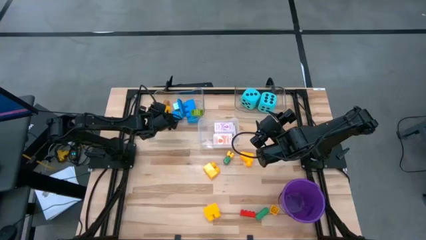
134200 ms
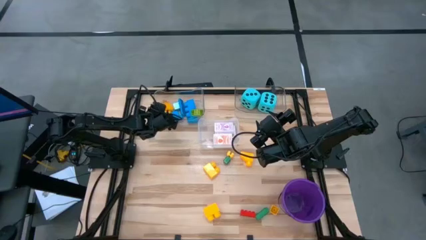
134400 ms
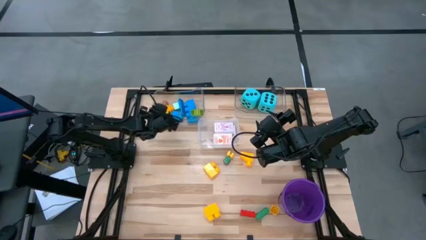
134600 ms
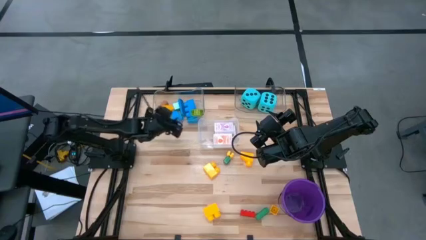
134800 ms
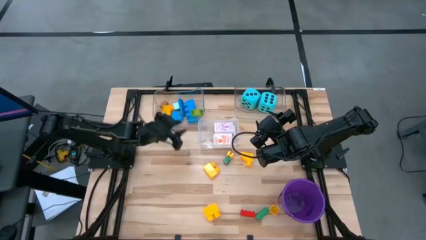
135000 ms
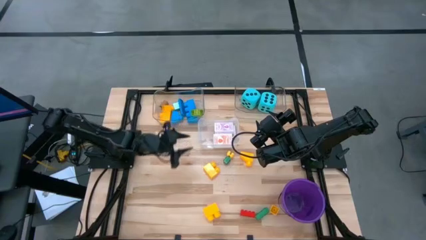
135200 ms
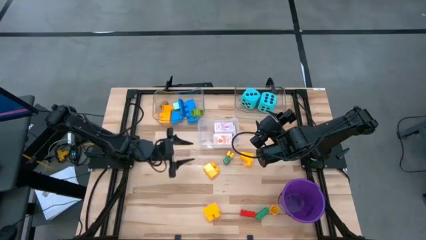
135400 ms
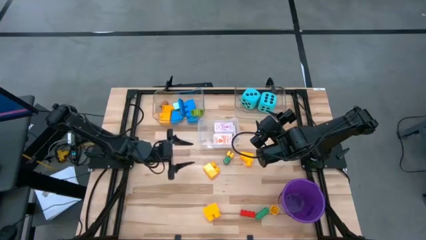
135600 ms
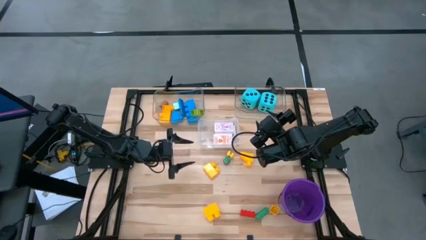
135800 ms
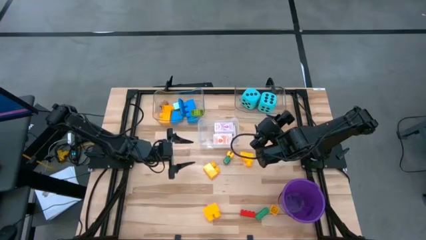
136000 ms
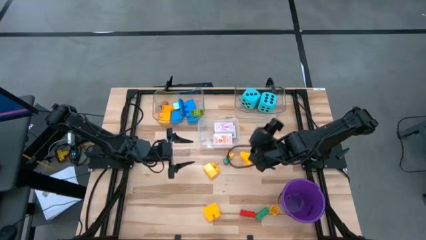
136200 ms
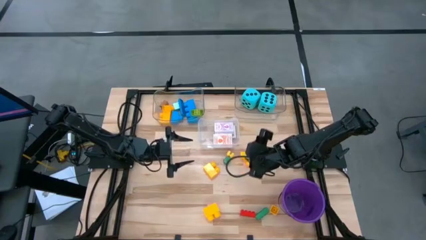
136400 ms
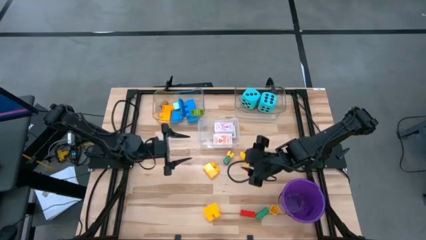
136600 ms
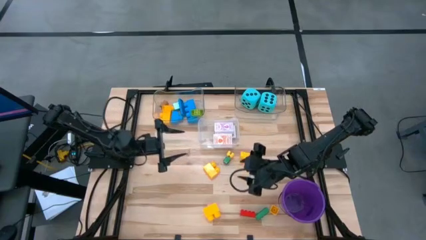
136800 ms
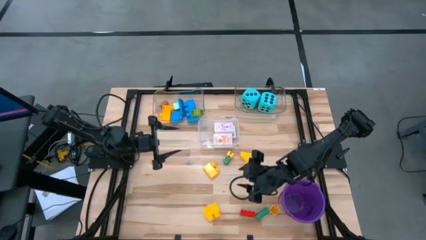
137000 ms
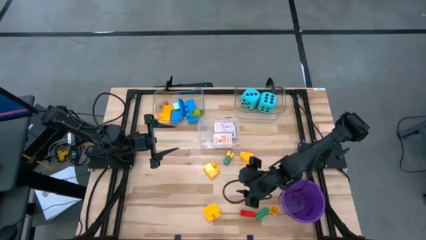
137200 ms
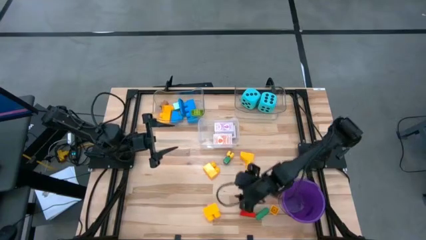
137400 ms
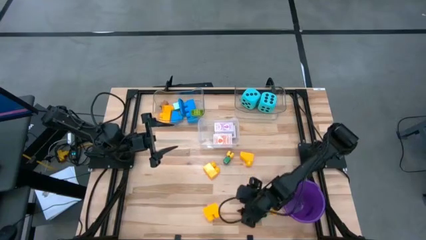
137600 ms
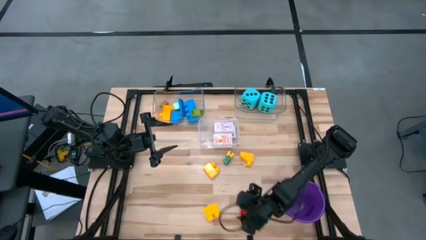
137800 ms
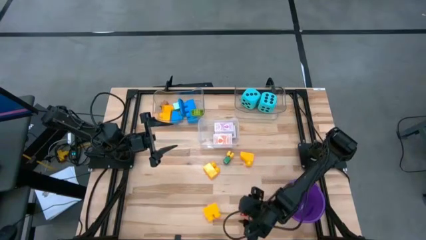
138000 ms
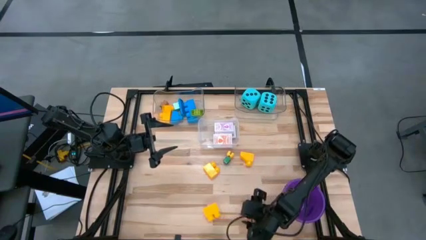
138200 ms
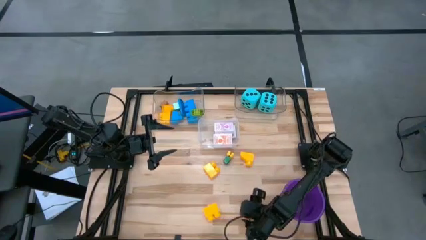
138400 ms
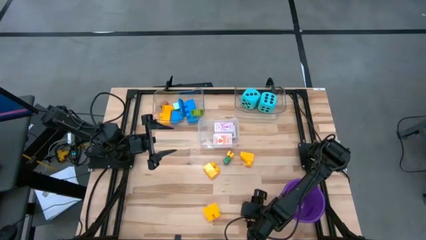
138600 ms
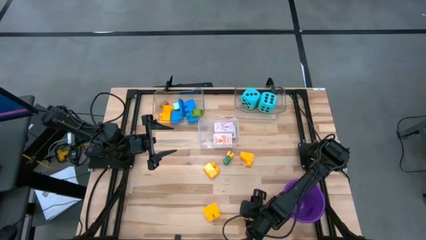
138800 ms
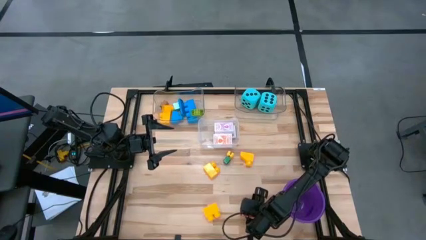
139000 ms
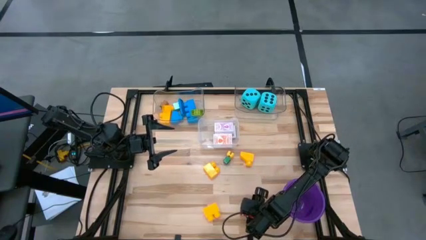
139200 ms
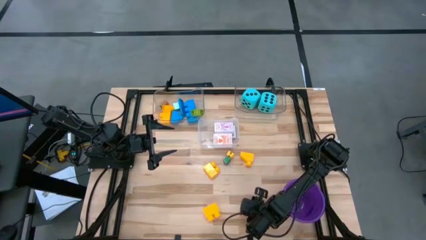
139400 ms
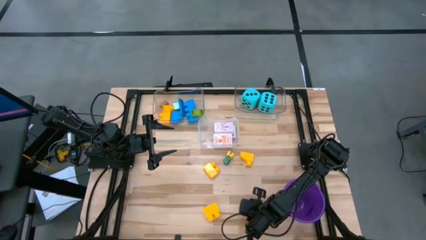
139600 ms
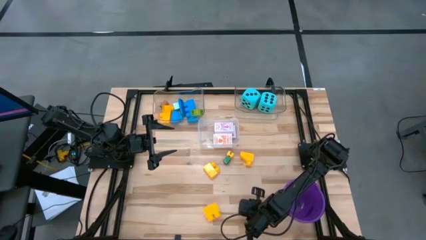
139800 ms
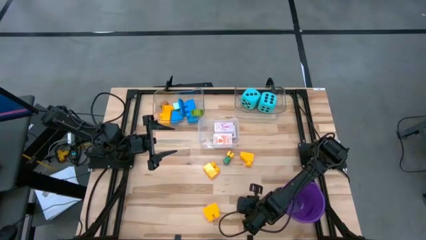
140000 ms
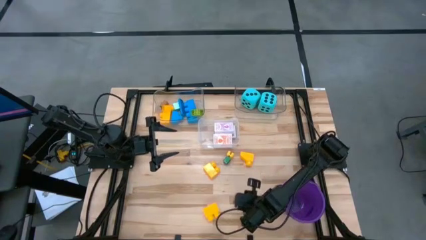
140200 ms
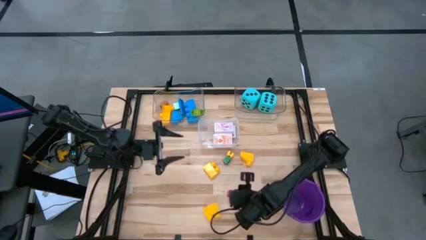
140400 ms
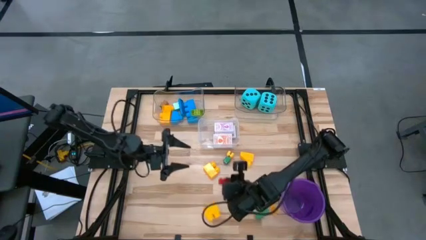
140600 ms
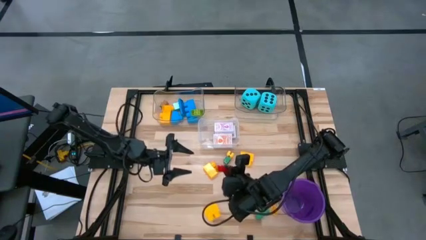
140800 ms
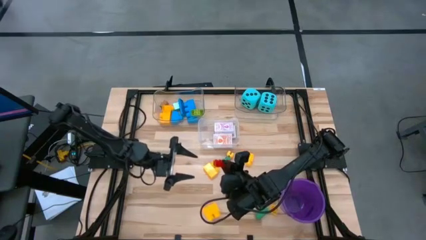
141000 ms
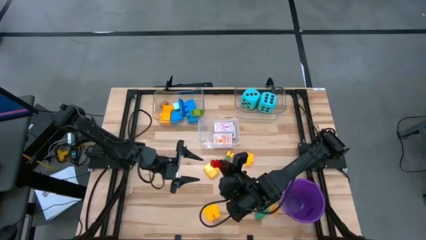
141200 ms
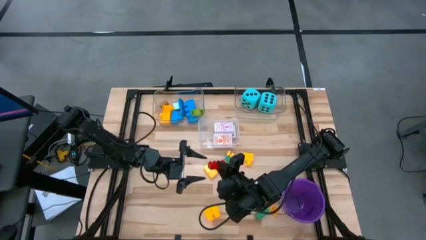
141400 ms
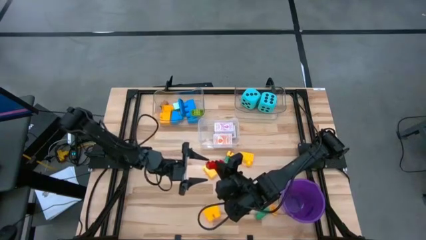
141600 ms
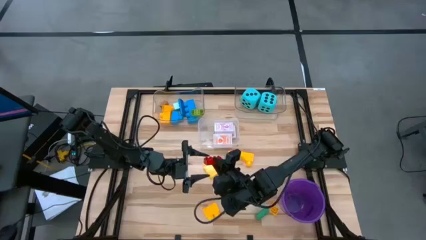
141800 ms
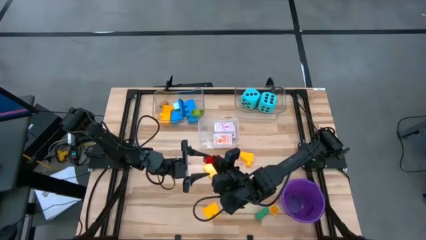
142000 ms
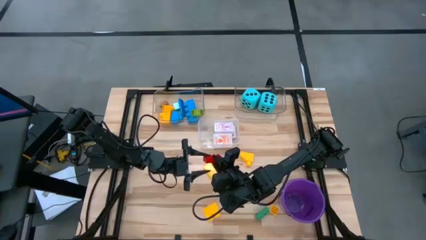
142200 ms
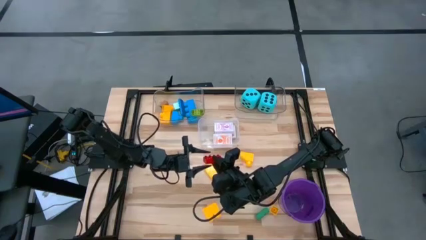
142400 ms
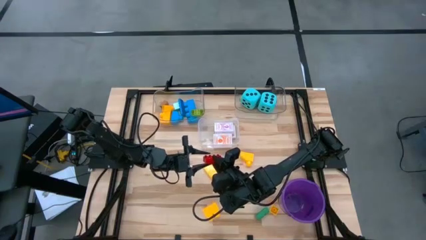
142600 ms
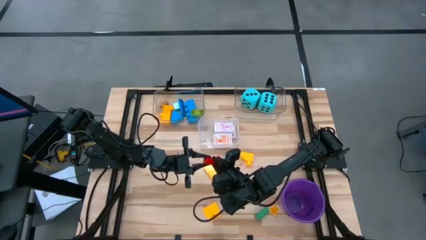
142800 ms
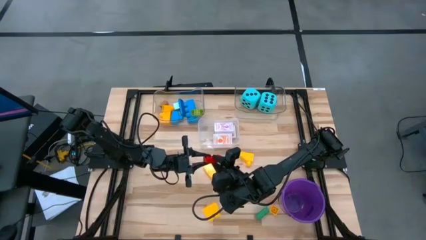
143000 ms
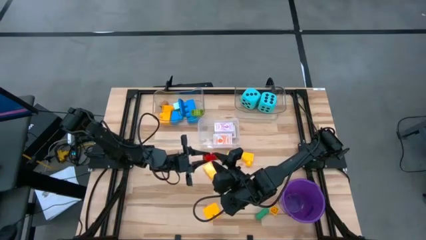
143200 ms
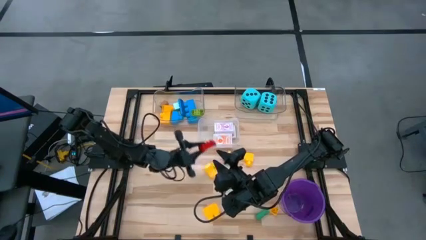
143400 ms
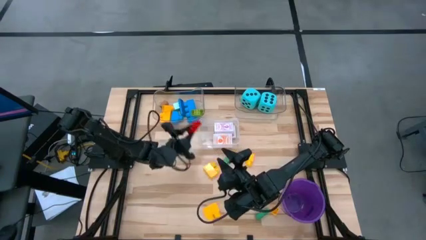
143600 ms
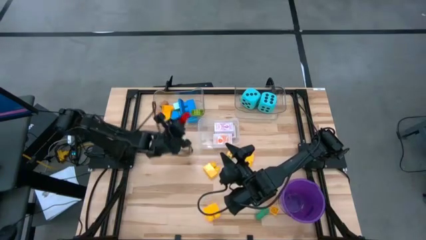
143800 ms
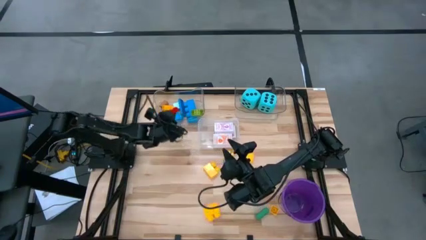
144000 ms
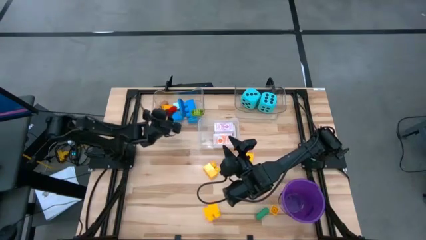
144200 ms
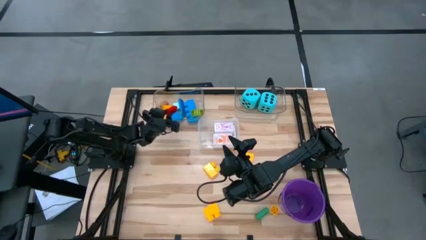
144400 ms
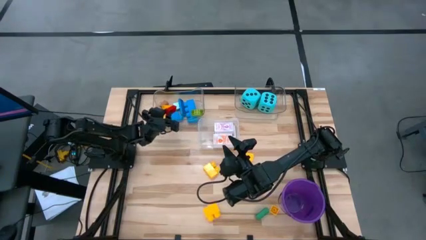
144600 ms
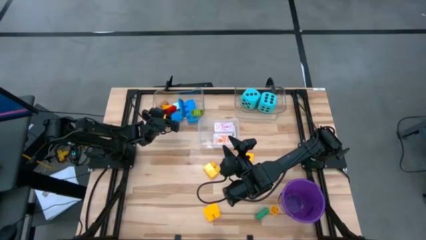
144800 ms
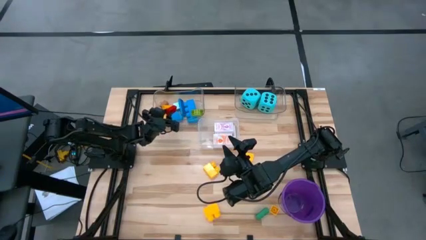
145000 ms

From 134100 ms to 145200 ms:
Task: Pick & Place Toys
Put the red game piece into the top left transparent bin

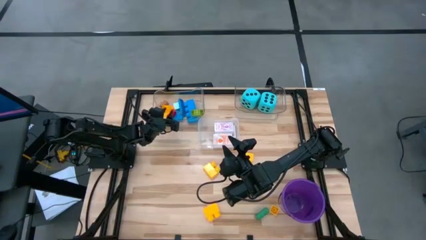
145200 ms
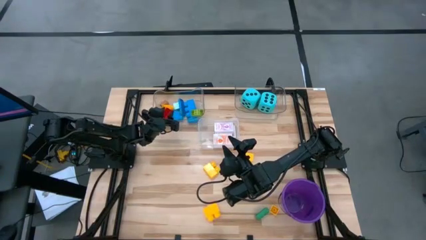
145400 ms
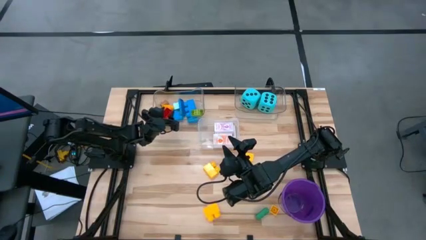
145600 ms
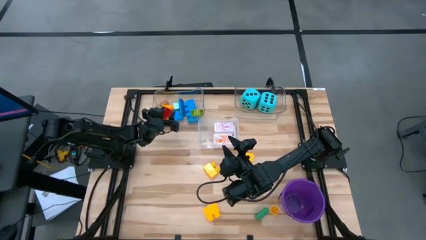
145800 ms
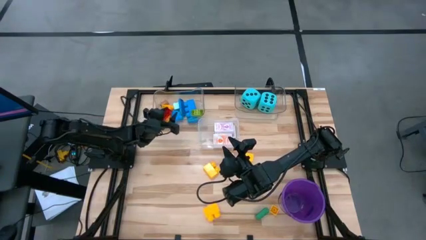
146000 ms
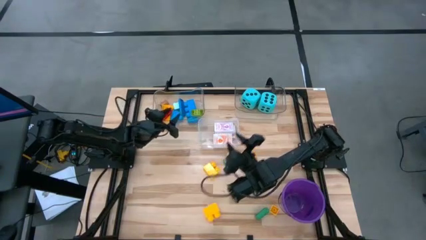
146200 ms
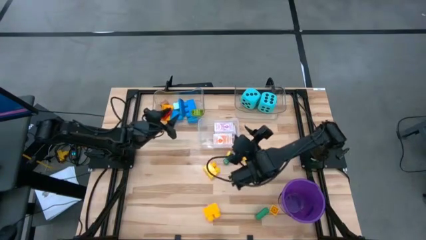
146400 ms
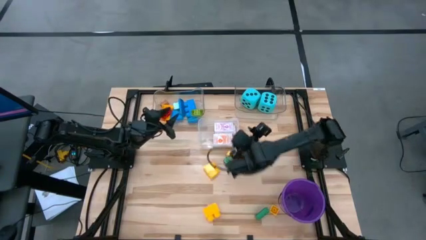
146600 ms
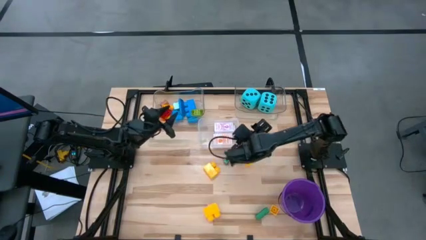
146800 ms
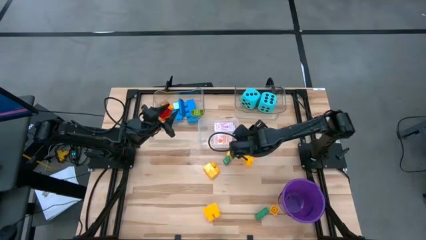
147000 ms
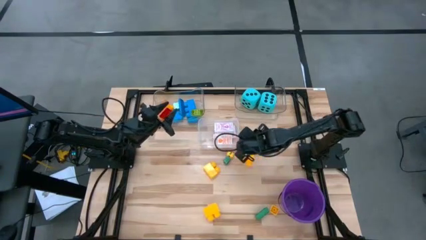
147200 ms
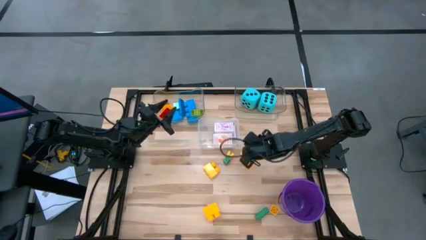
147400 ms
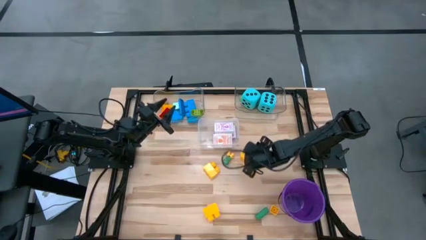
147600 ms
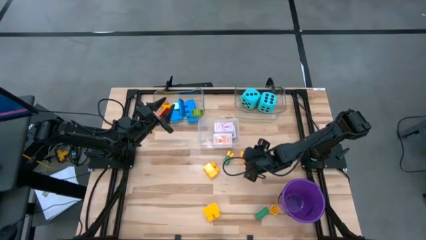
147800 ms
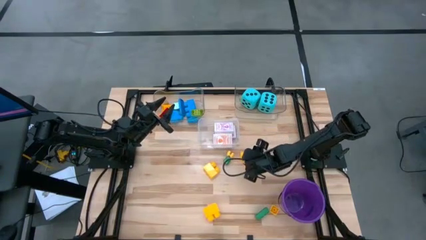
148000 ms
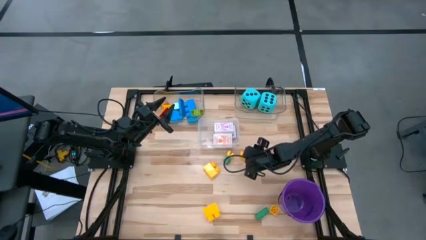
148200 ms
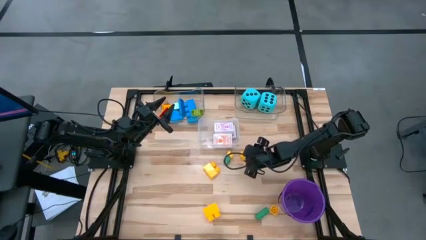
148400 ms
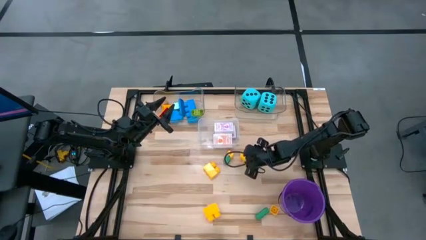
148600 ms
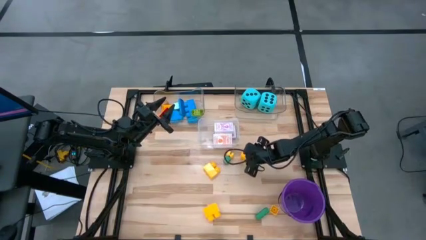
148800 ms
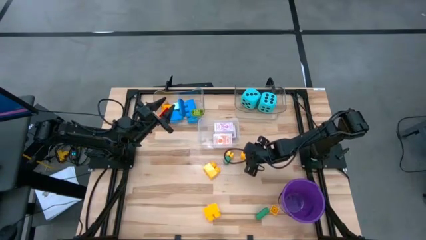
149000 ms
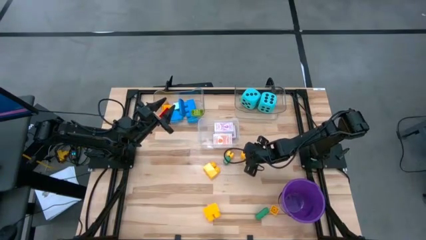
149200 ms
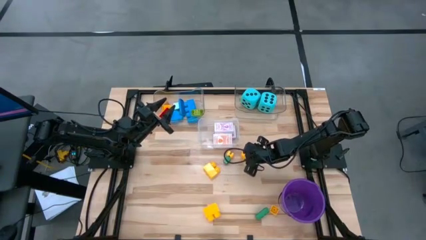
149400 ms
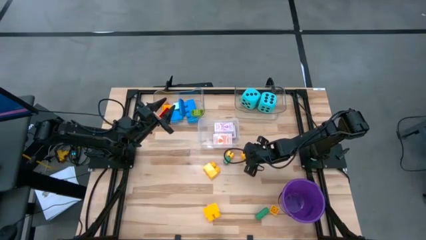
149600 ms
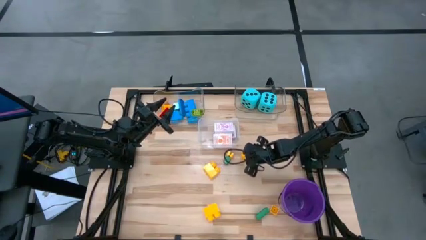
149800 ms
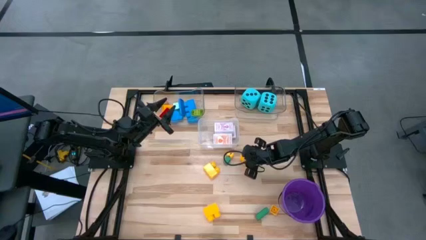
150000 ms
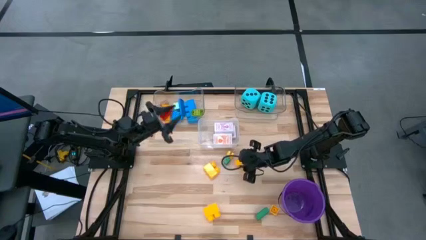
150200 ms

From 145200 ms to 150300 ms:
Put the yellow game piece into the top left transparent bin

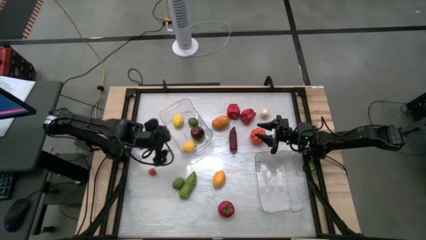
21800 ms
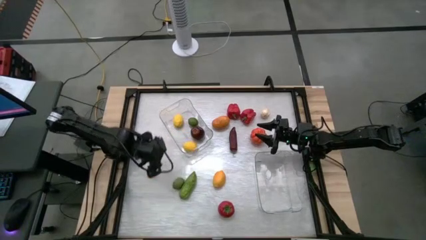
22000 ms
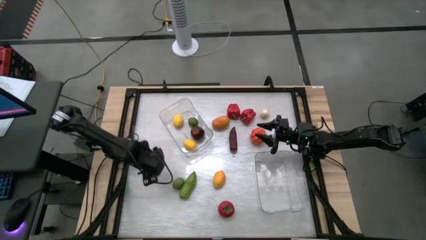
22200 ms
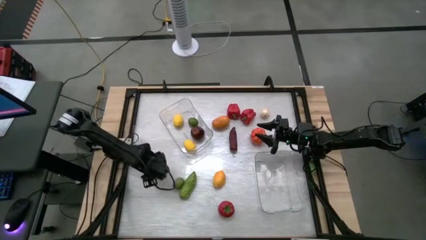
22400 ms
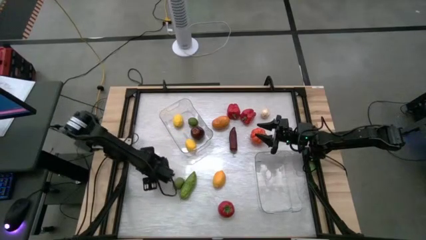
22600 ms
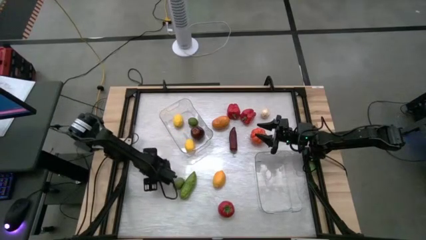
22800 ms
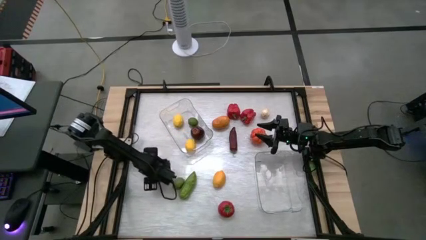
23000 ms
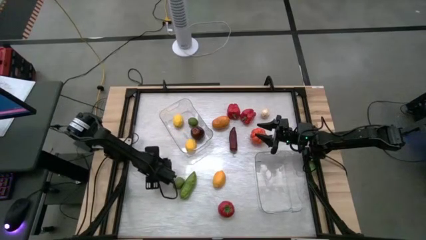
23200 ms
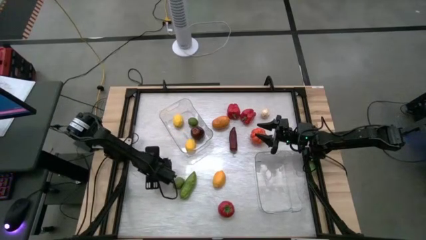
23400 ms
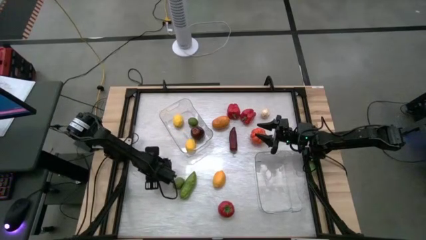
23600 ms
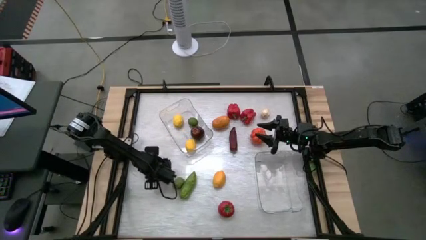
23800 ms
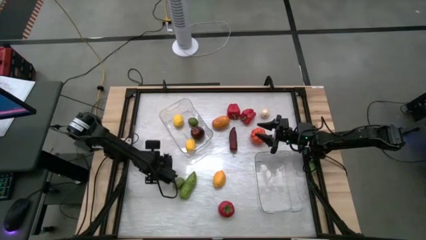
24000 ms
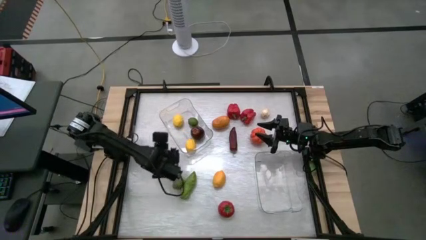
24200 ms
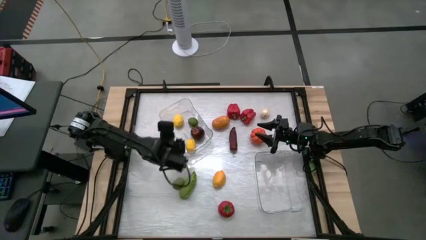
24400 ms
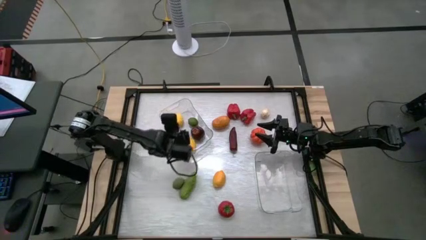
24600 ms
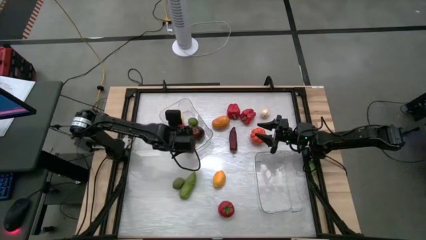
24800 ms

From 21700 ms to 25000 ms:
Task: Sort produce into baskets
Put the small orange tomato into the top transparent bin
